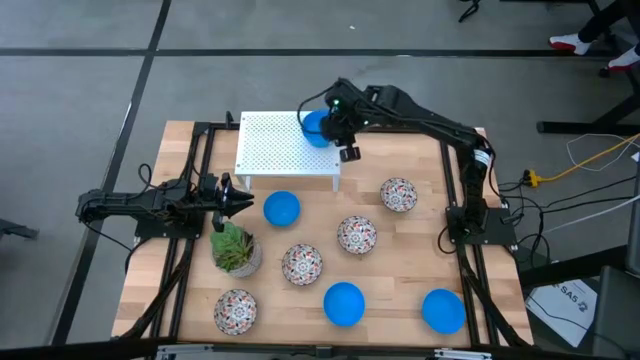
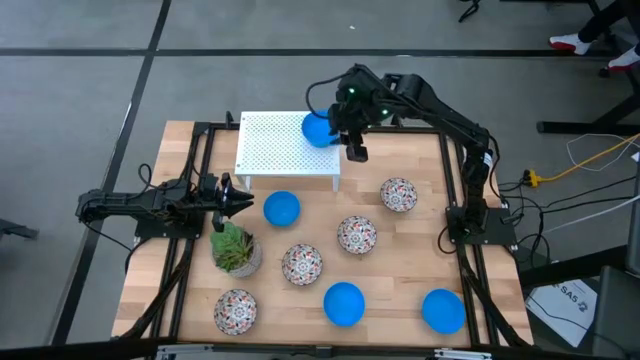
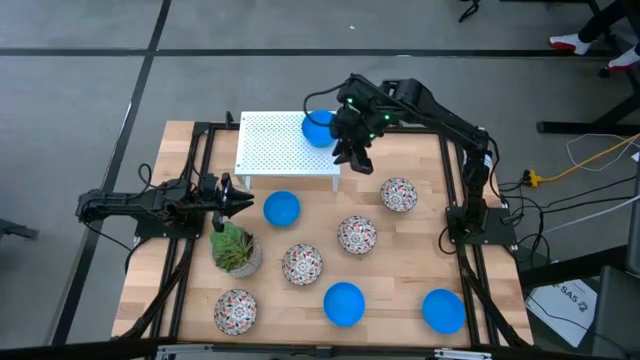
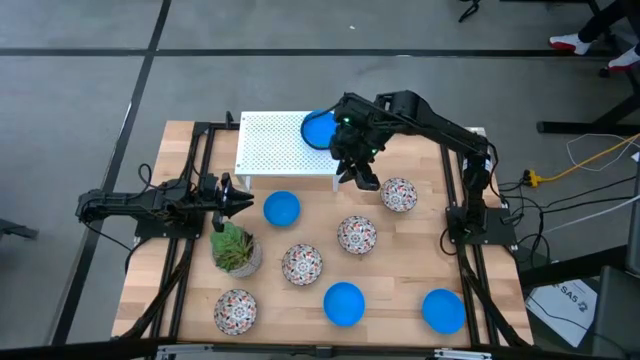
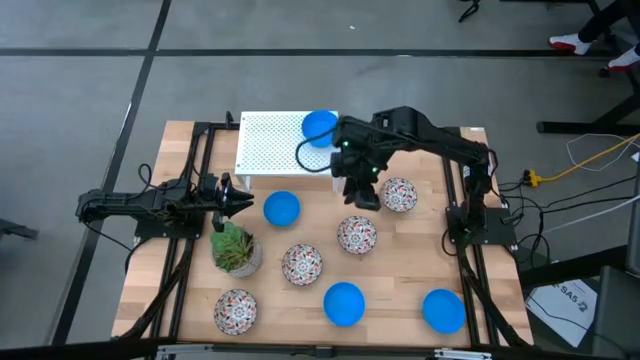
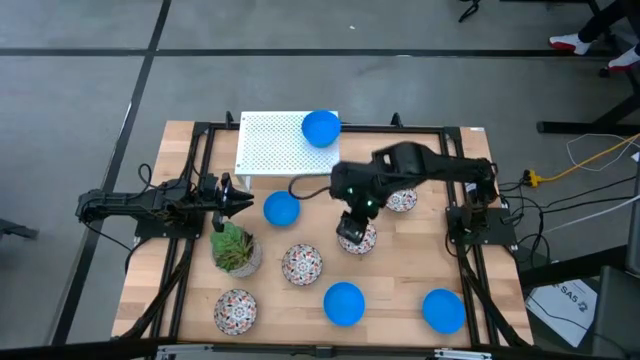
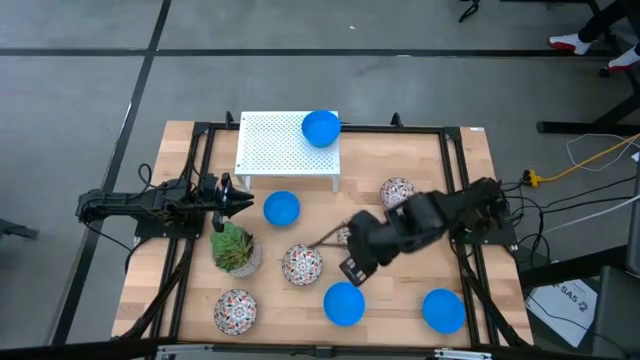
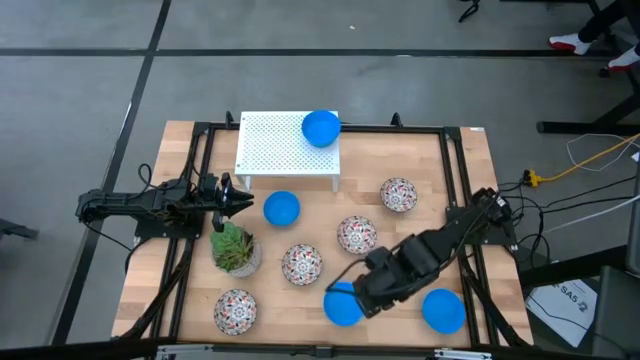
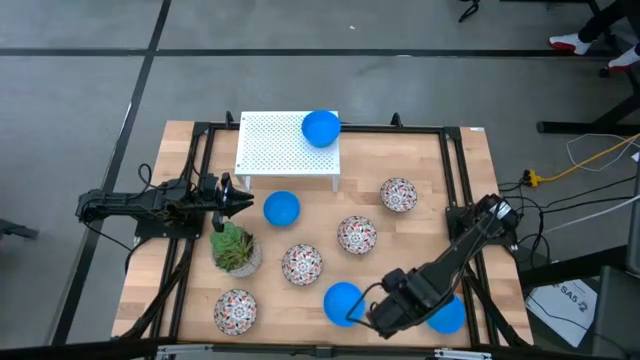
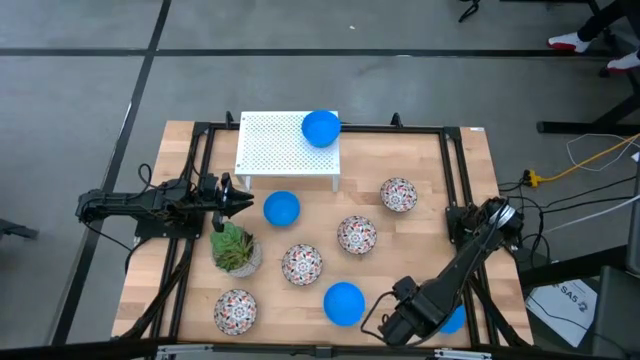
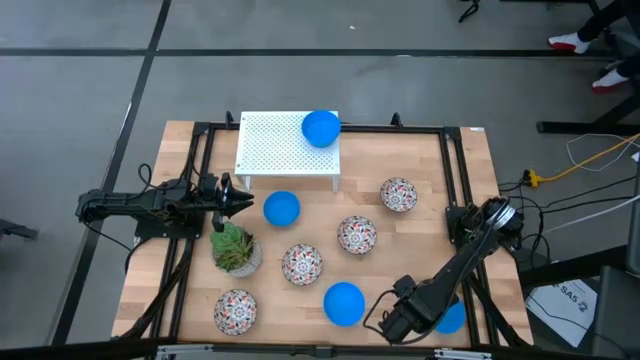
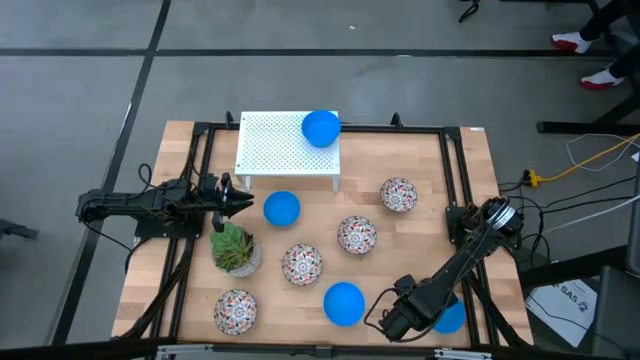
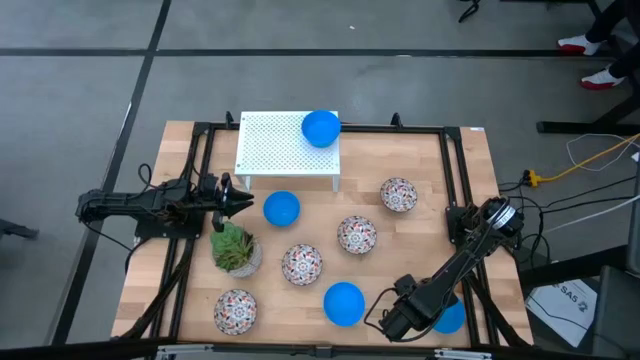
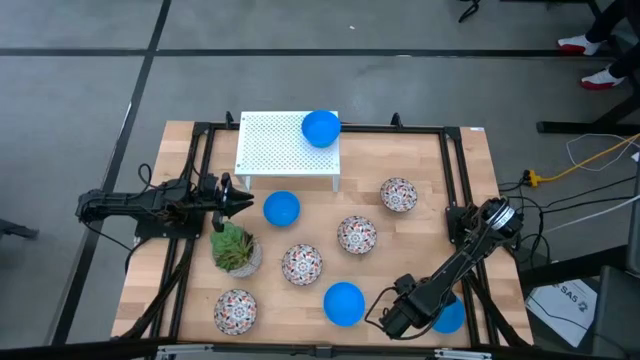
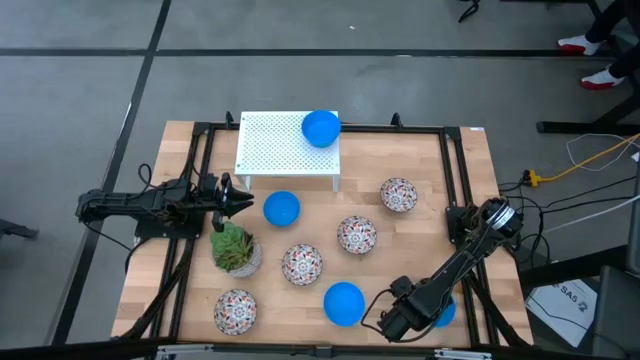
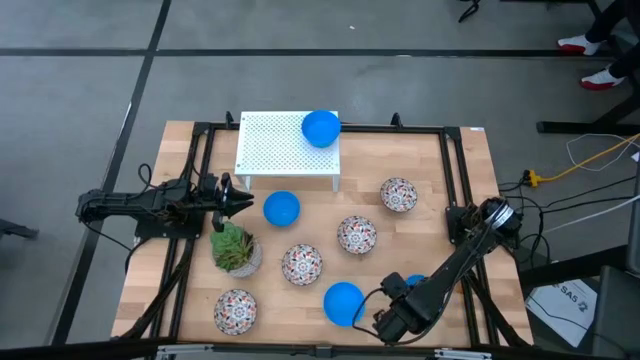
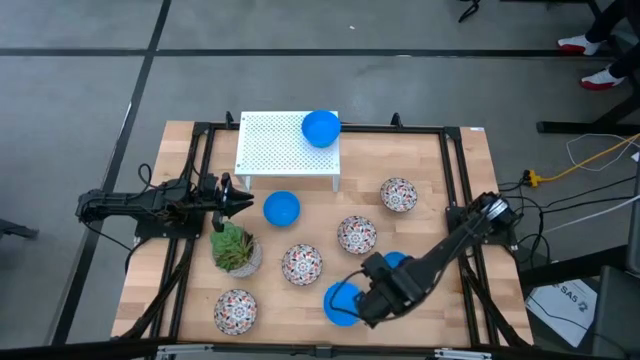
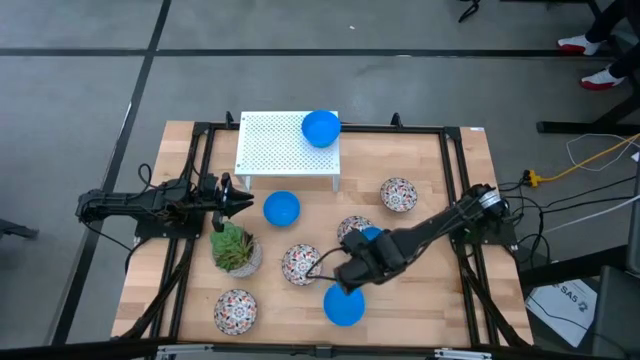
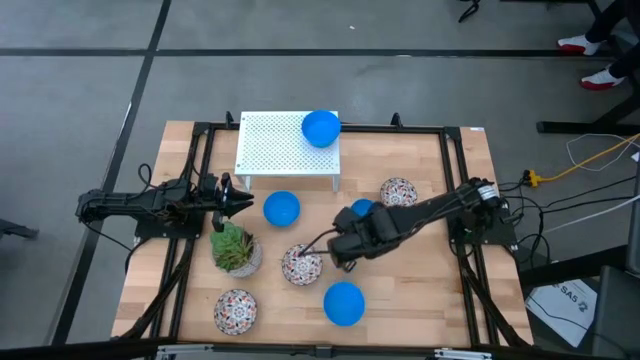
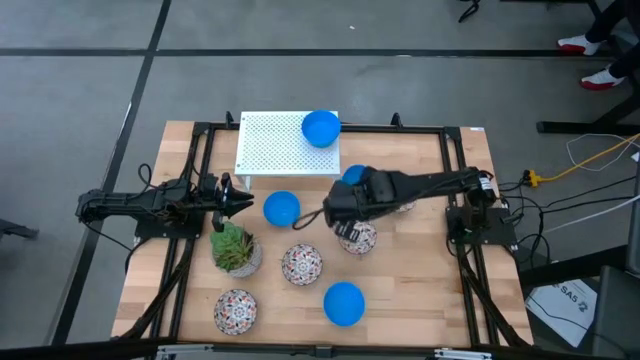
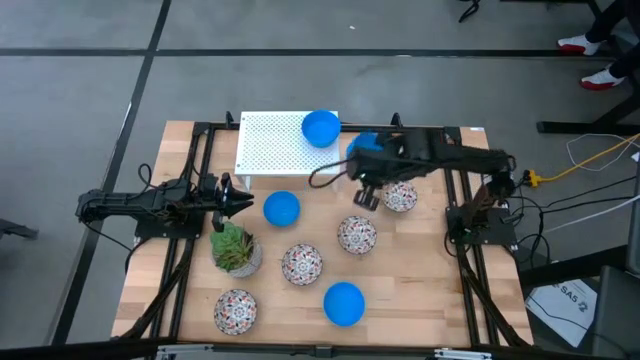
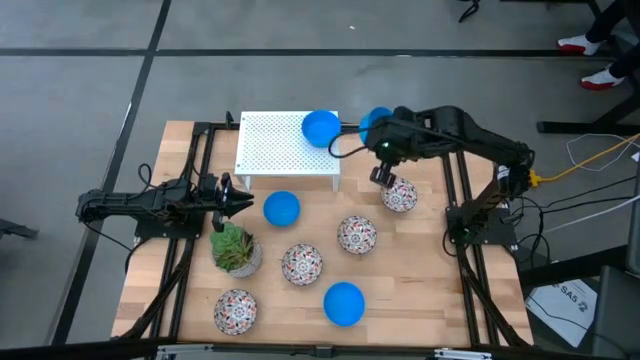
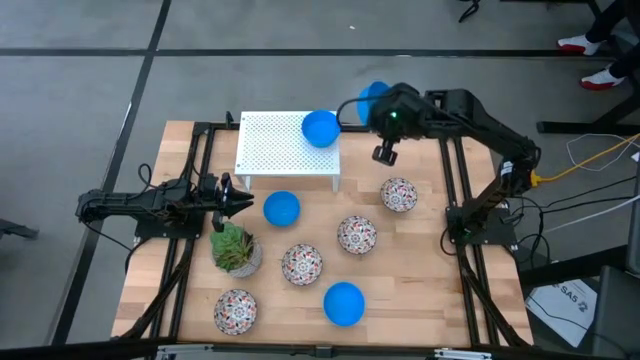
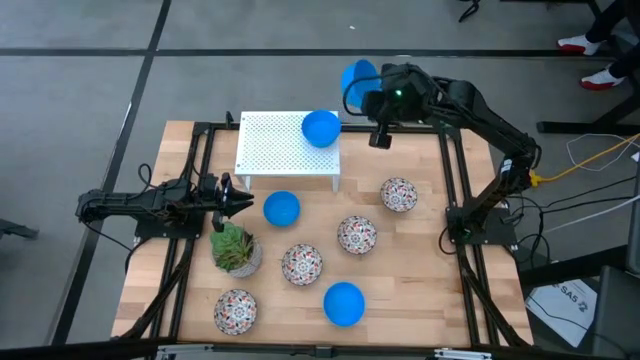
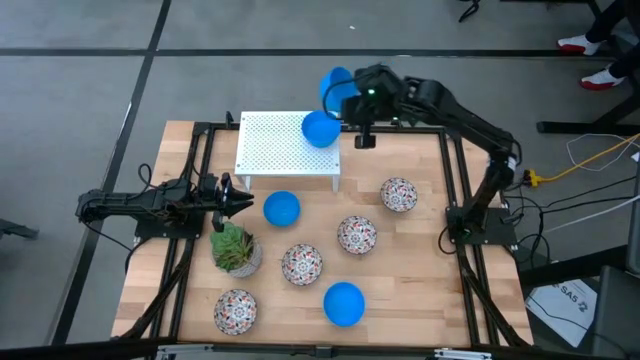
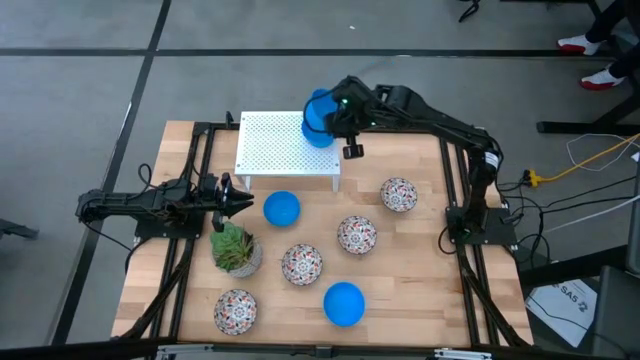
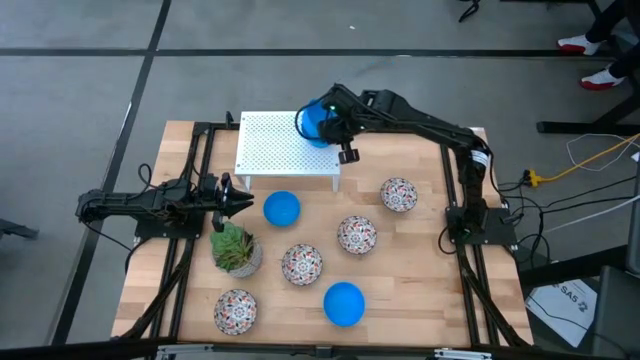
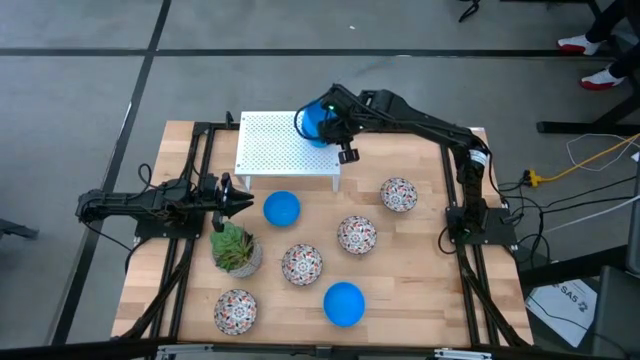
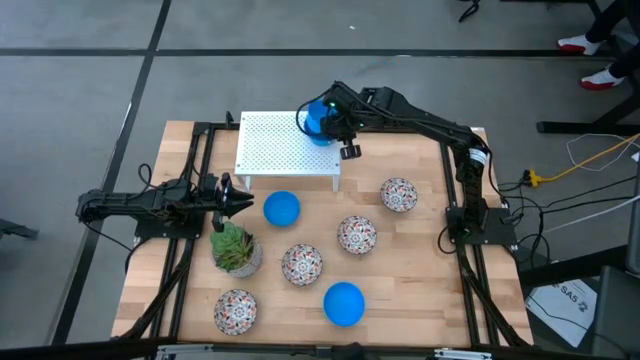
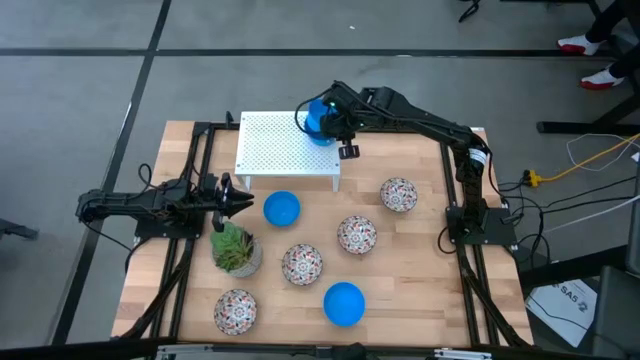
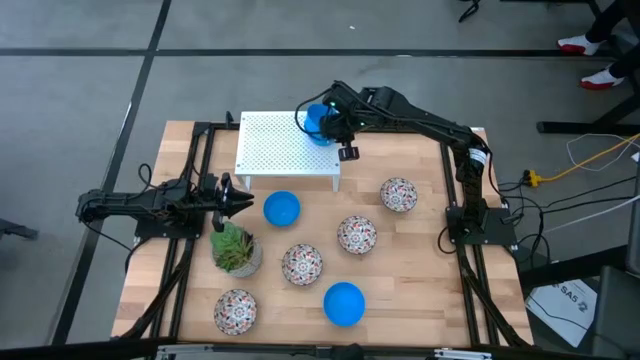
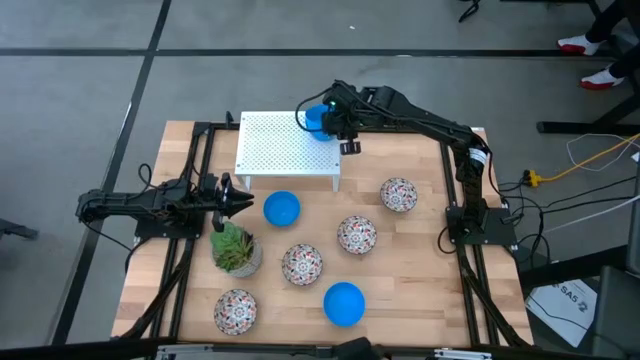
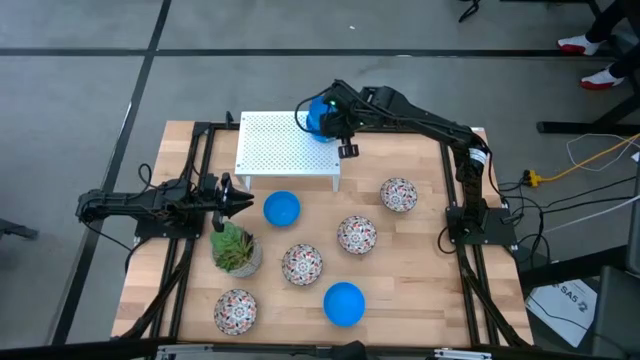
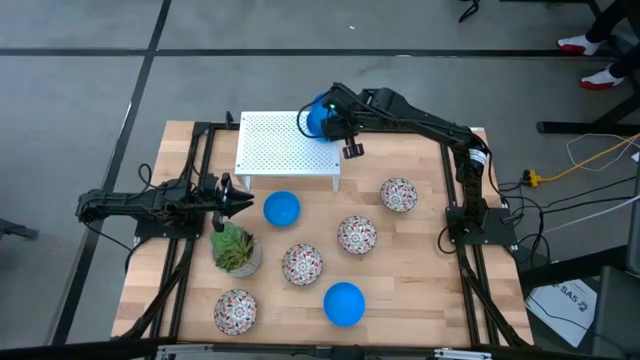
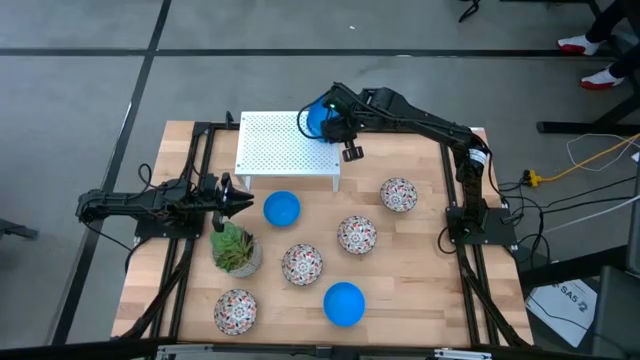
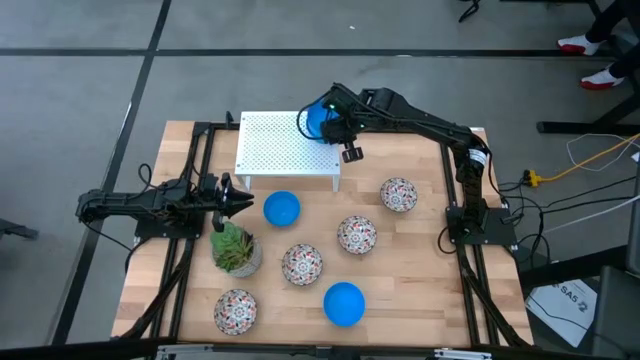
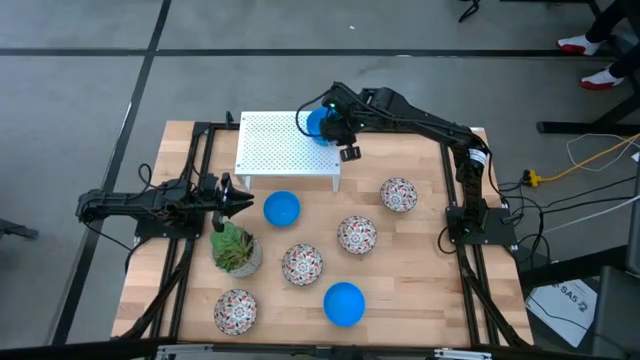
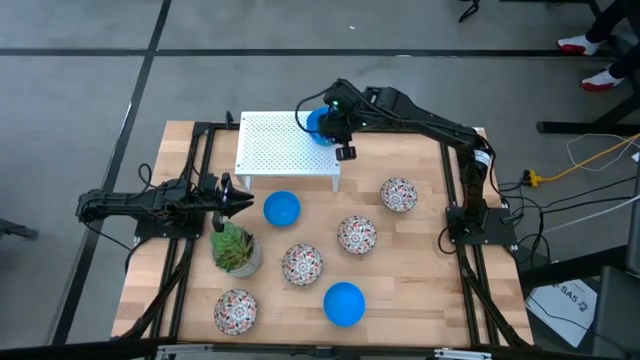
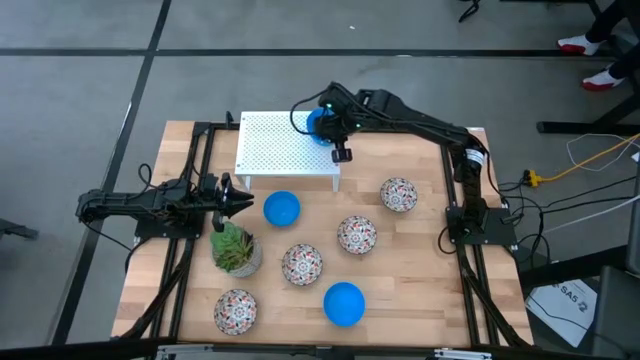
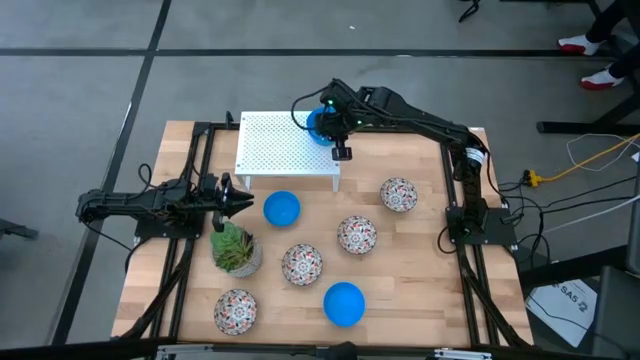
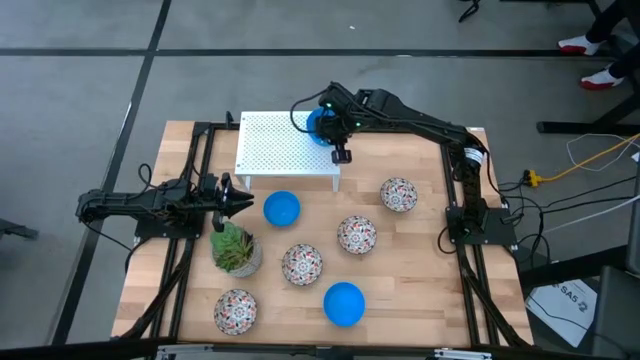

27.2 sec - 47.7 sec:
Task: Pick & Place Mini bowls
Stack the blue bowl on the blue bowl on the shelf
